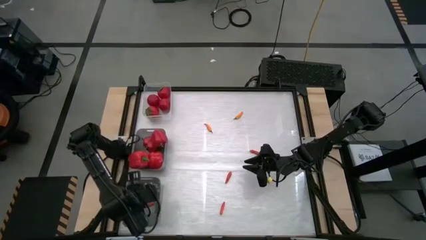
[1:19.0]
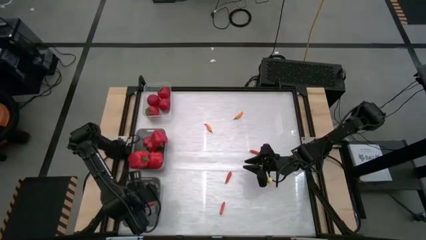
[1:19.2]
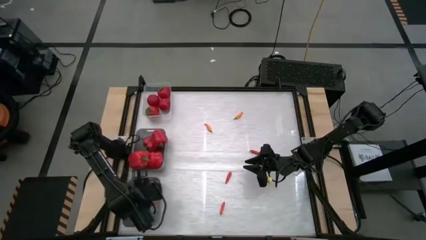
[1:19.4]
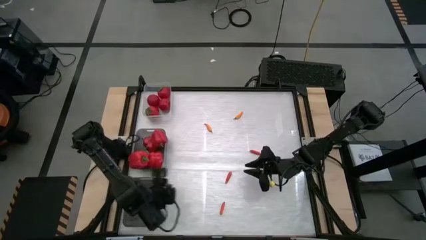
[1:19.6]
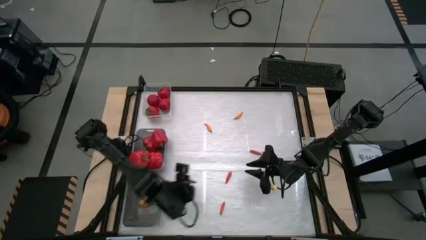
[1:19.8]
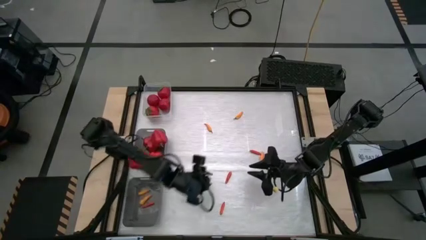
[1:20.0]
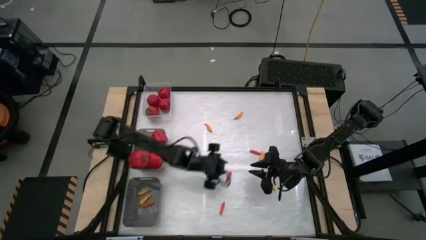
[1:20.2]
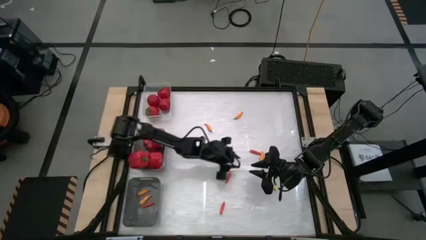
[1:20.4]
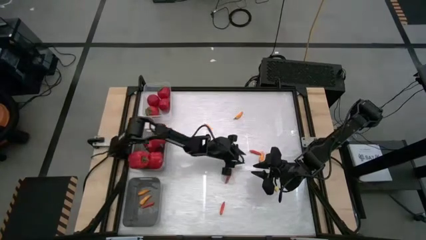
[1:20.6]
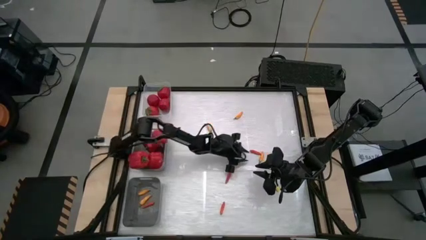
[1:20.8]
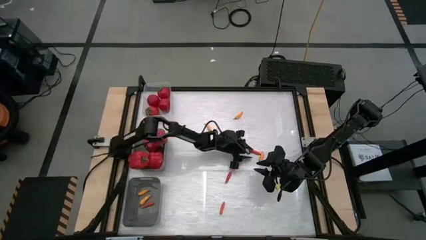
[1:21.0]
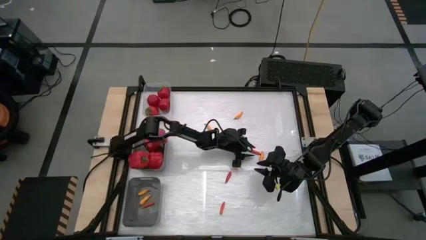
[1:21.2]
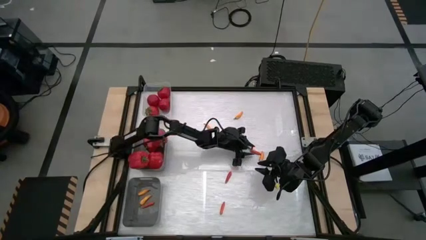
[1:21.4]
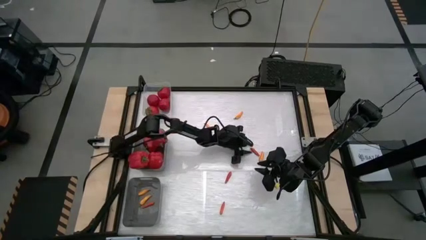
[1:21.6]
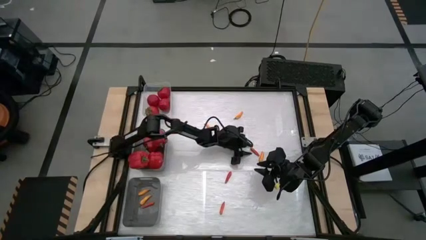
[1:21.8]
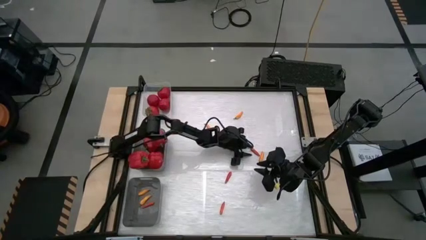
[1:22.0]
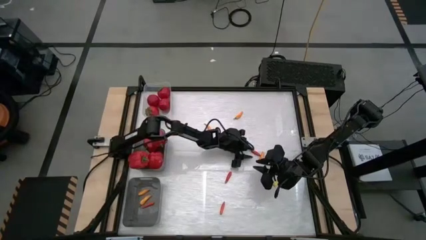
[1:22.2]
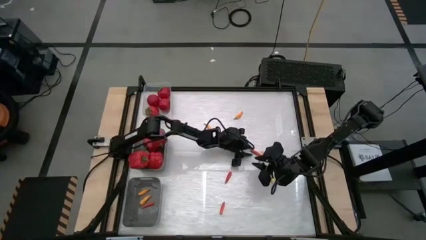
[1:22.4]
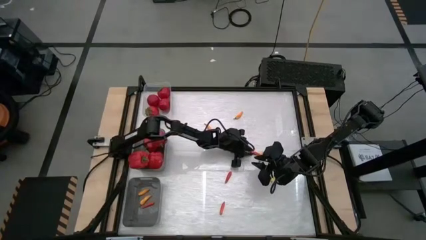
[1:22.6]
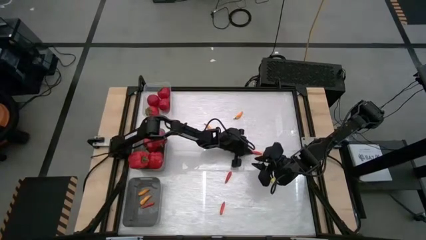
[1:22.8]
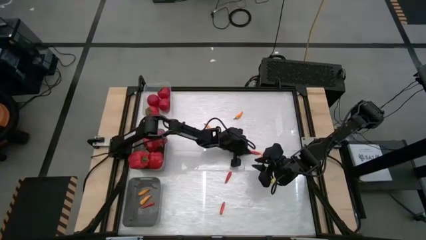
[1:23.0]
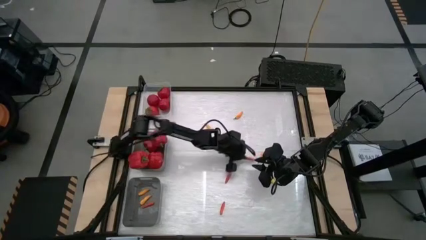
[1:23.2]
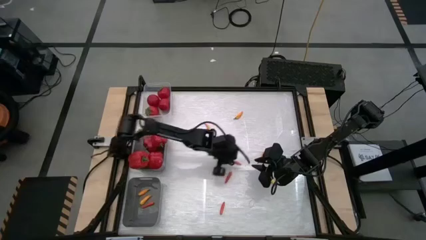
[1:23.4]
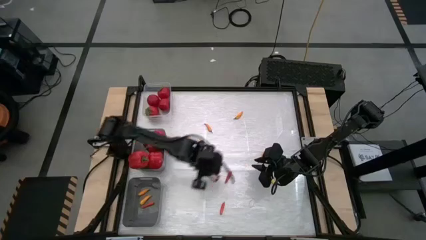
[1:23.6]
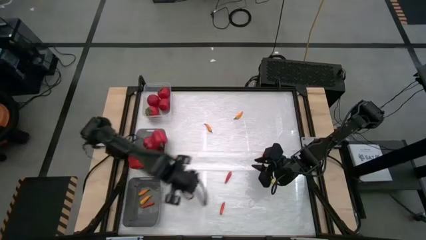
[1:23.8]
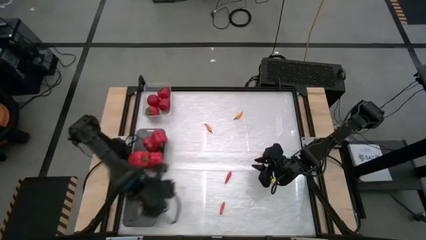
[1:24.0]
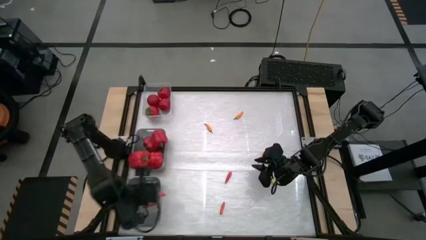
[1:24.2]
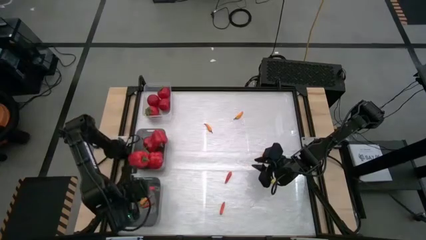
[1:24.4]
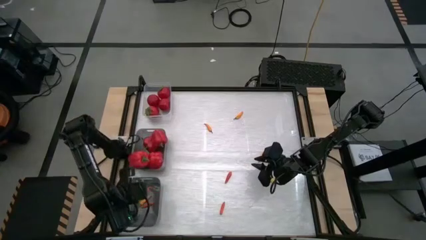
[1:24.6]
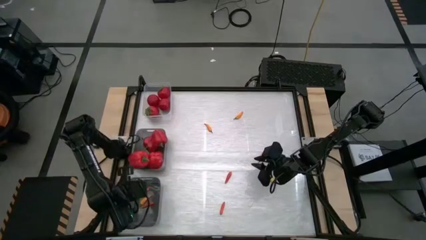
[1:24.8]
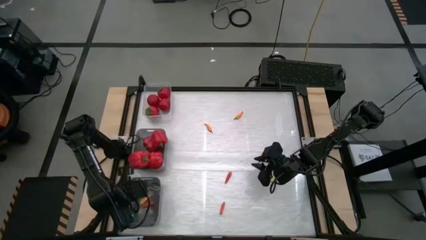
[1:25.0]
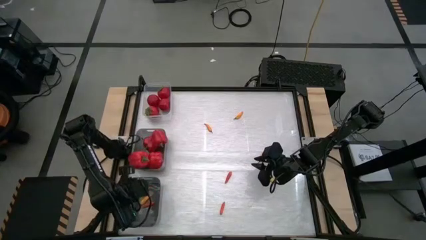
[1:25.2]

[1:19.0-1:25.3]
Task: Sort produce into baskets
Put the orange chili pepper into the bottom gray bin

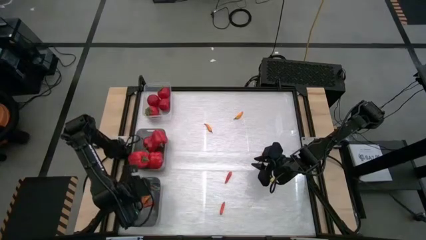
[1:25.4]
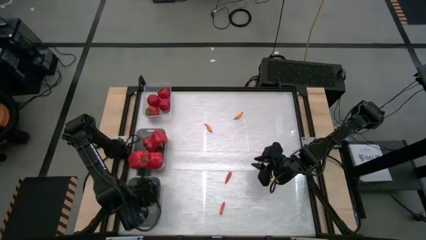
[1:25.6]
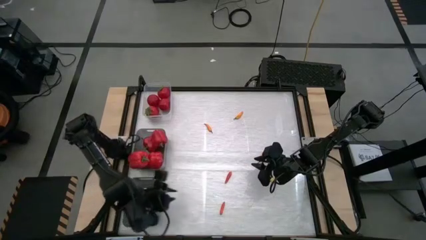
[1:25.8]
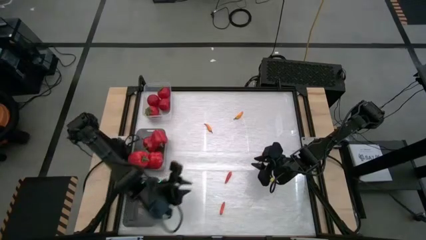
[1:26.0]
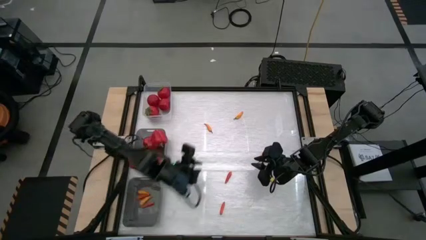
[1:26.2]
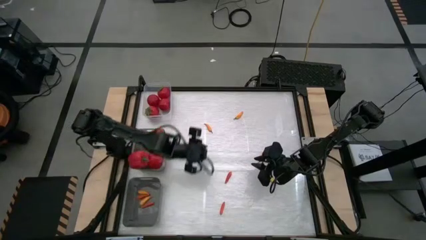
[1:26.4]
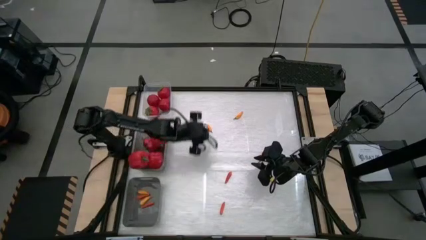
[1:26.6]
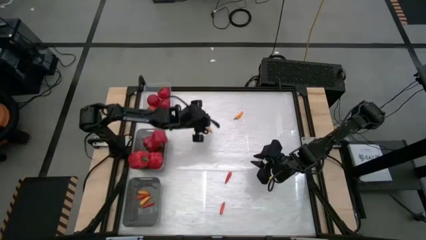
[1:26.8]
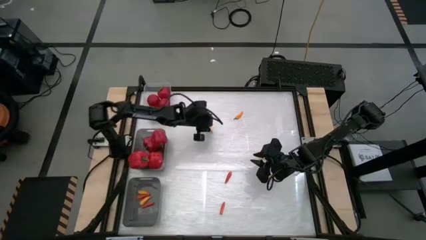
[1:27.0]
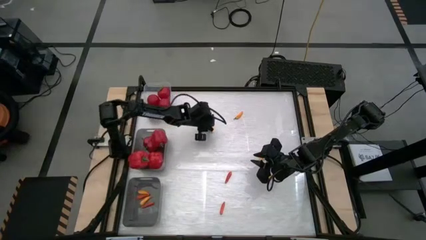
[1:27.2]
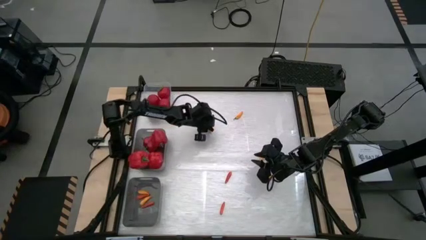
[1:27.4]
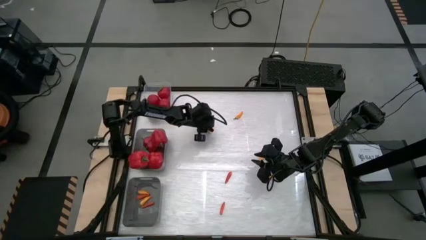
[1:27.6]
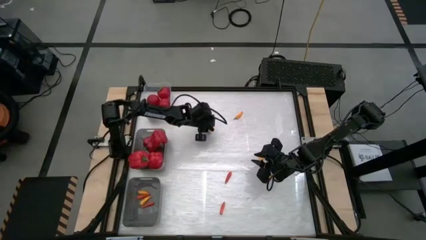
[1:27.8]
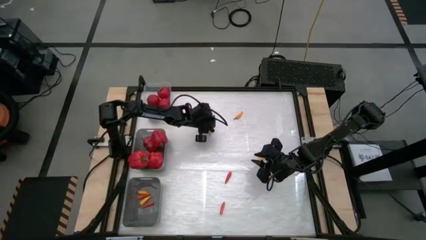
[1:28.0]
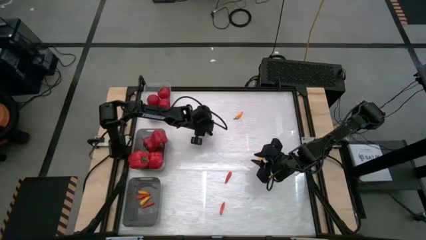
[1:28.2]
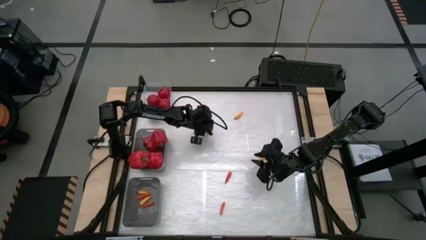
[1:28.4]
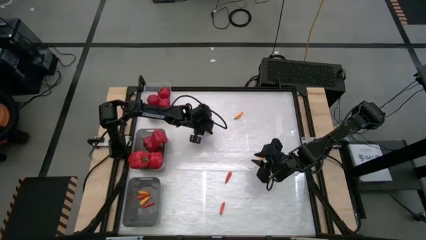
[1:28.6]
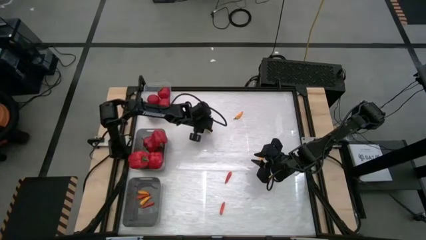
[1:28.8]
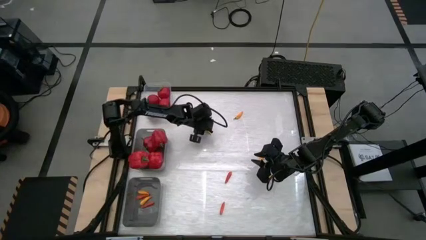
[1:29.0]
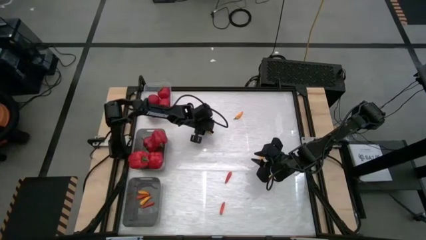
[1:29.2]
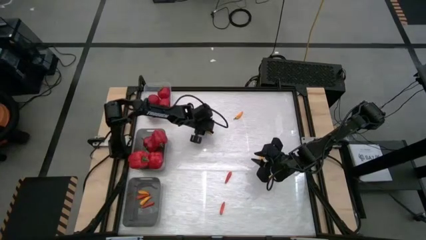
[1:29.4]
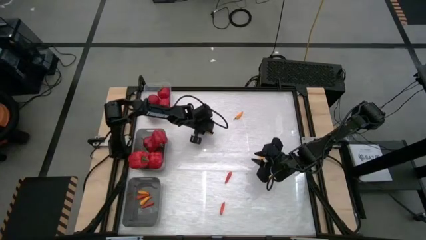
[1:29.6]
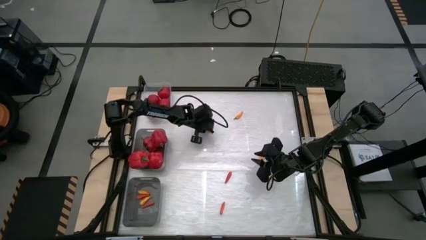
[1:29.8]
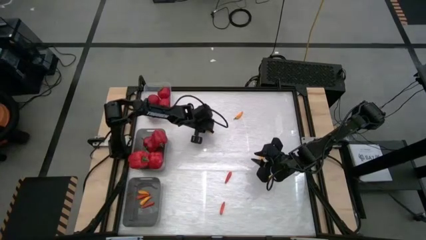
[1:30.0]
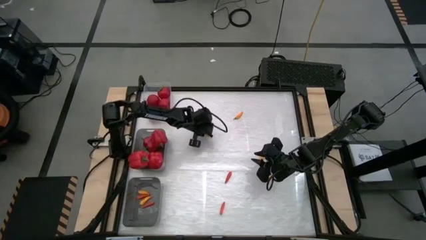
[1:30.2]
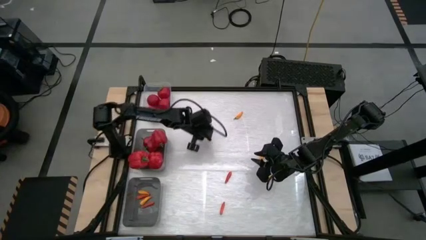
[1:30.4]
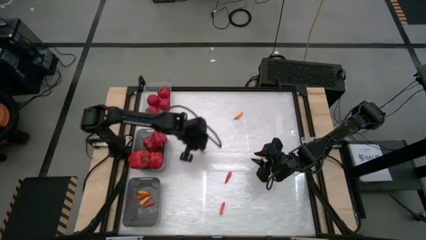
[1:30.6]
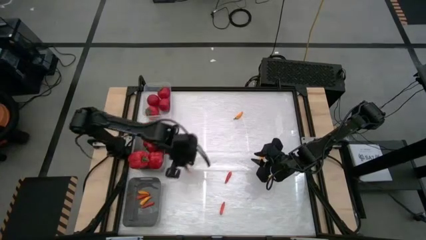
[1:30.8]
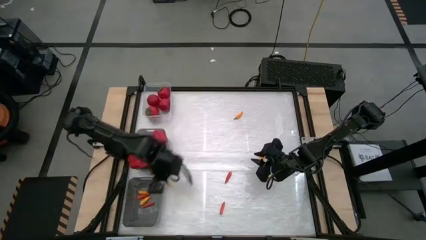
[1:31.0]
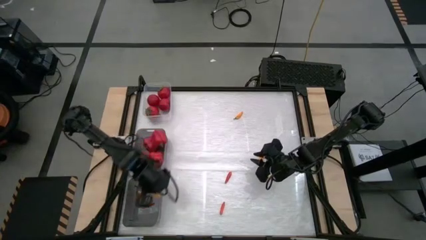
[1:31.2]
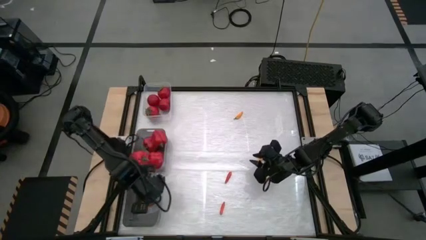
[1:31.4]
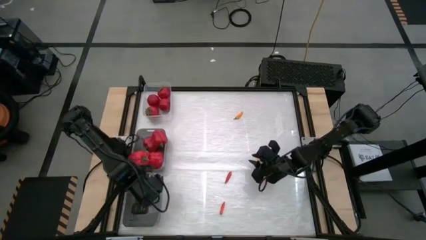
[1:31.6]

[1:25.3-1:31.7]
Put the yellow chili pepper into the bottom gray bin

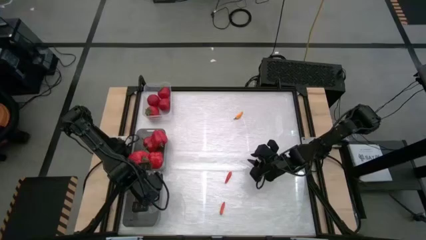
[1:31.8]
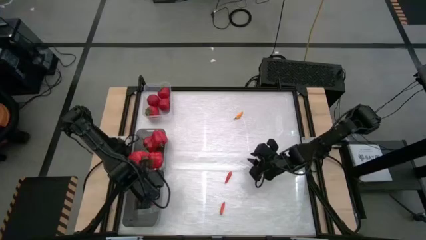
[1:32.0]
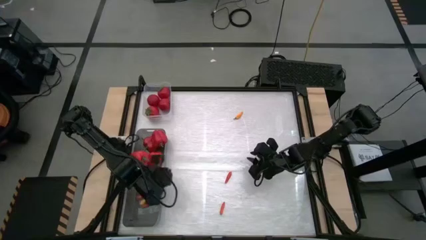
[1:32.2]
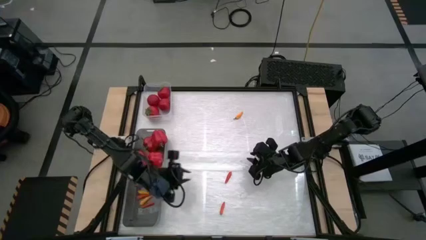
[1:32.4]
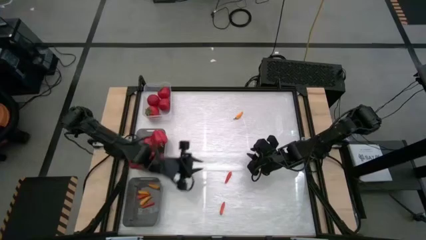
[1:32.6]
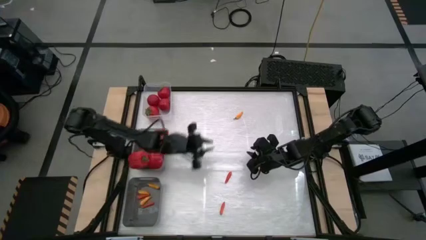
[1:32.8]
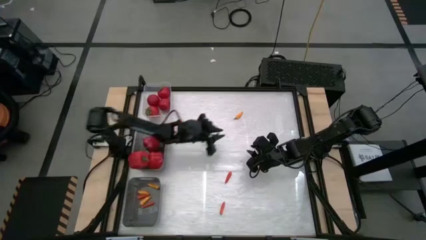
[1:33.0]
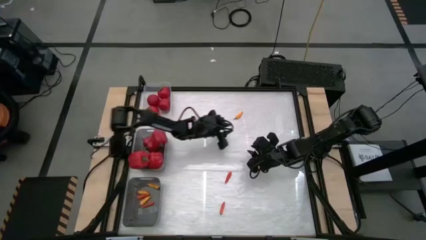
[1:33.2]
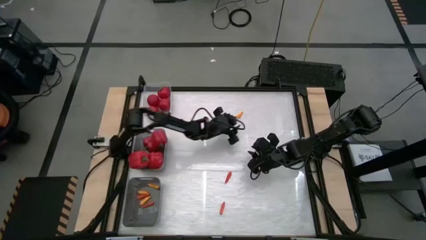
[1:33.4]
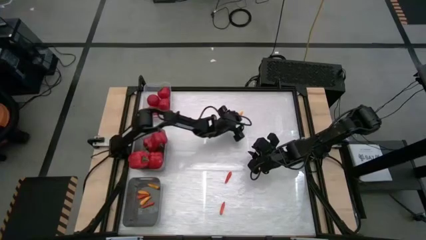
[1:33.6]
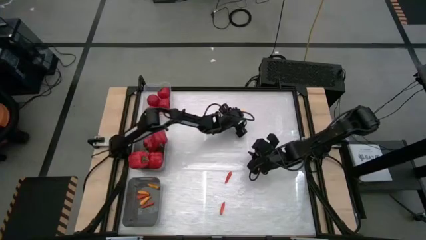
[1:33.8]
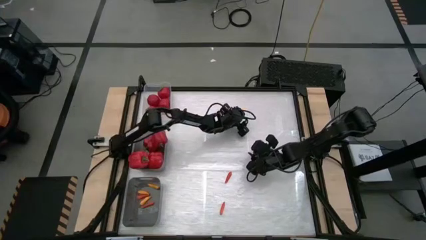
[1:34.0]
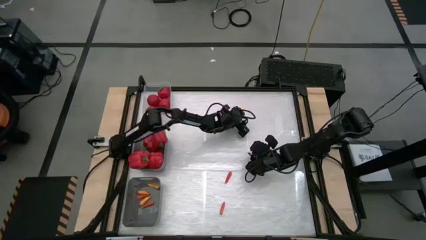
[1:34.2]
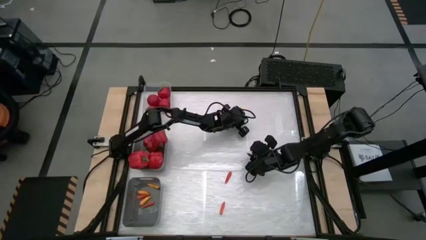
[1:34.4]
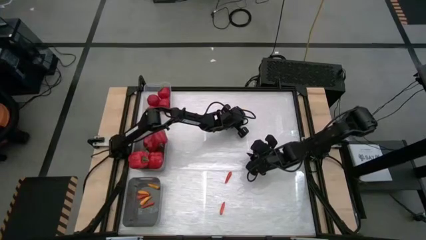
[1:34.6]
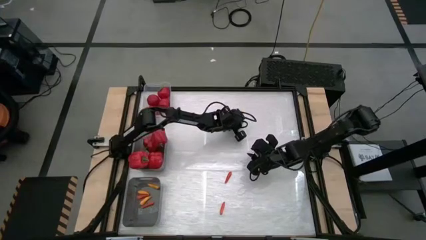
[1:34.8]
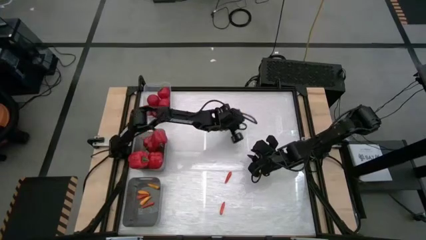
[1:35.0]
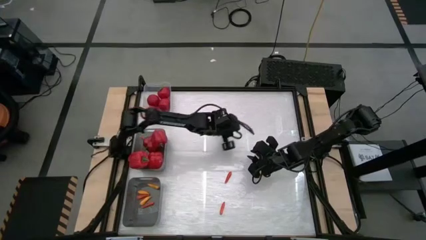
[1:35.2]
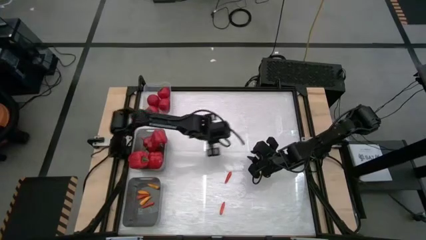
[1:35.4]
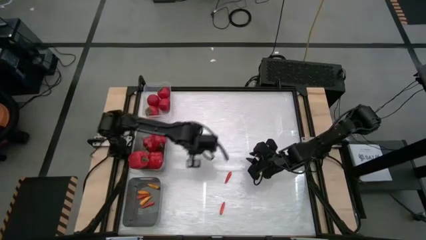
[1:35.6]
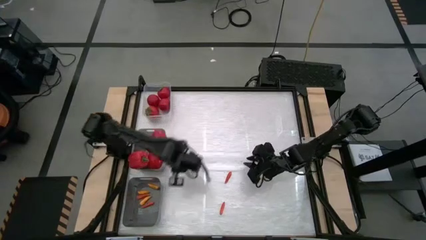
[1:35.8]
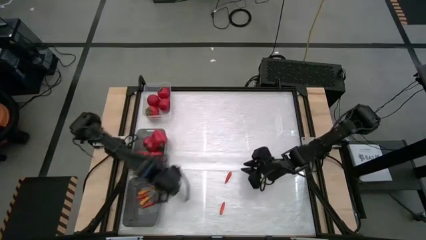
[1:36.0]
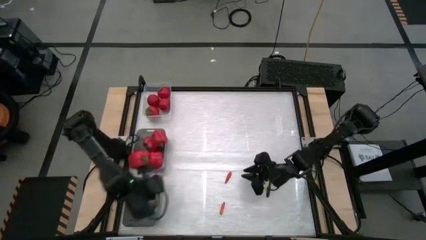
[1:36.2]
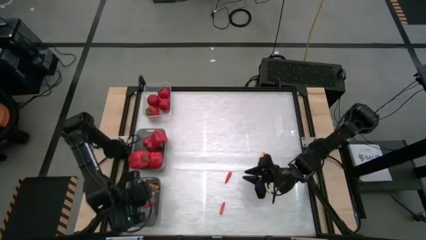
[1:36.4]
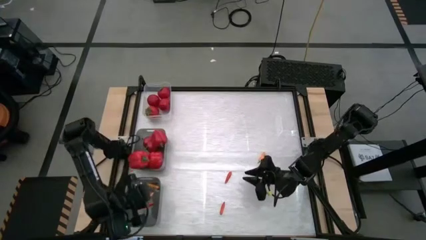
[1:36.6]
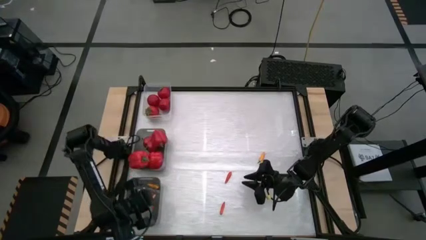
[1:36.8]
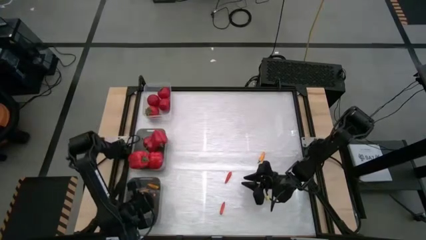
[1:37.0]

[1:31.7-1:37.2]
Put the yellow chili pepper into the bottom gray bin
